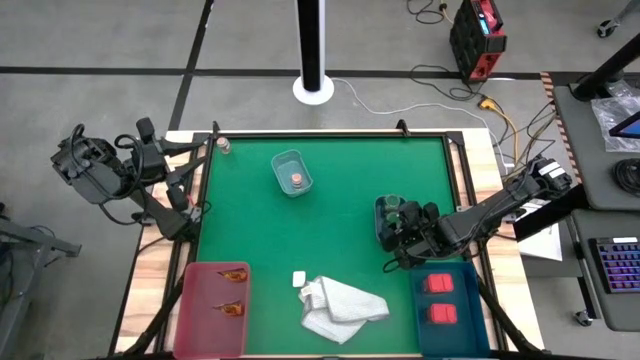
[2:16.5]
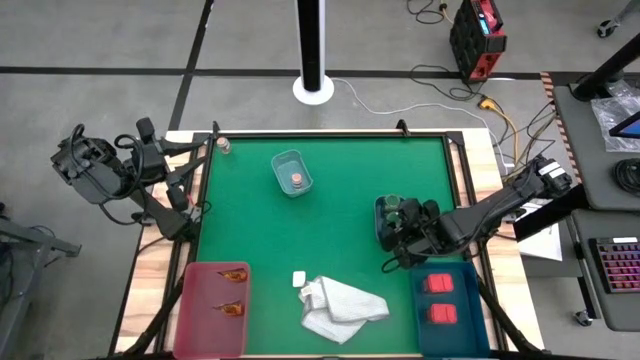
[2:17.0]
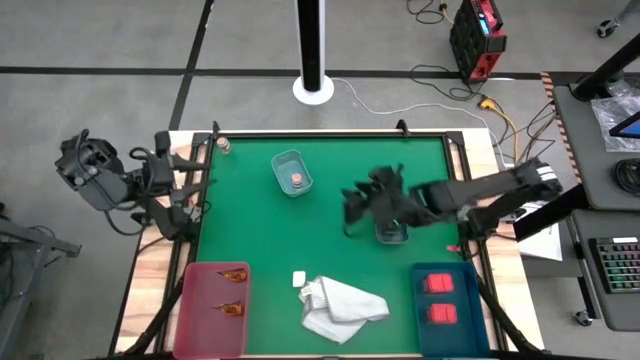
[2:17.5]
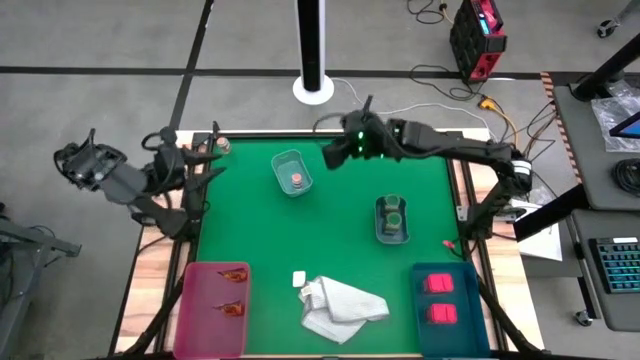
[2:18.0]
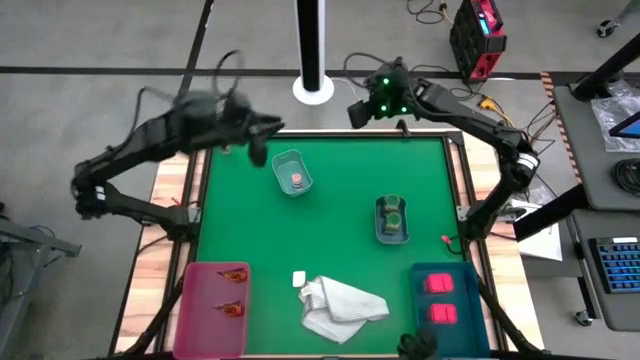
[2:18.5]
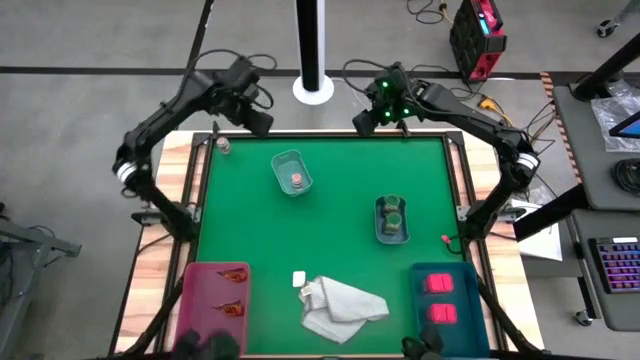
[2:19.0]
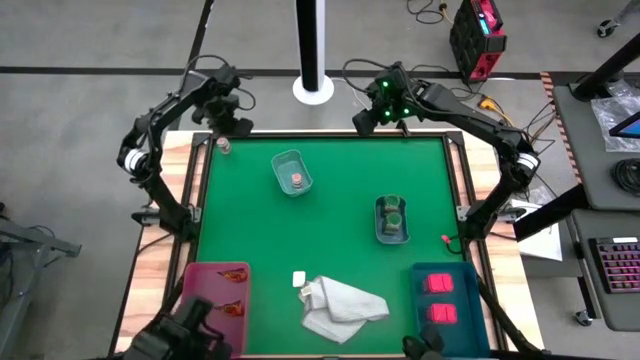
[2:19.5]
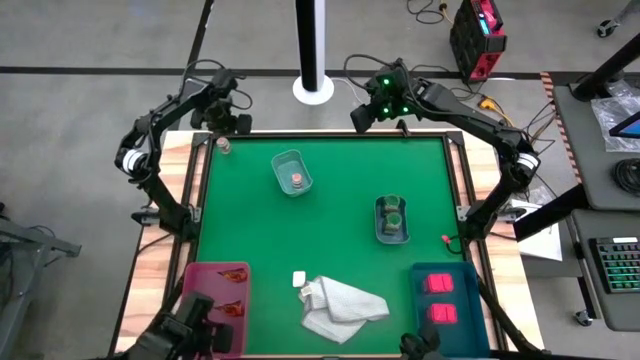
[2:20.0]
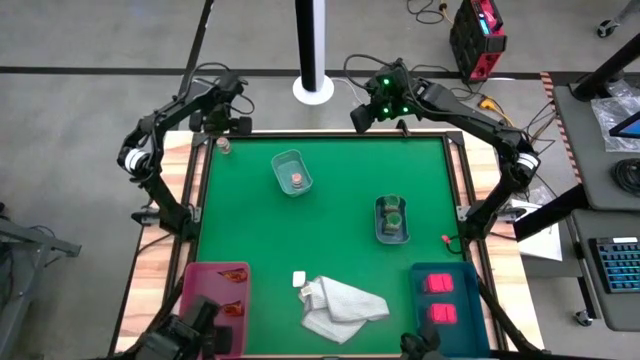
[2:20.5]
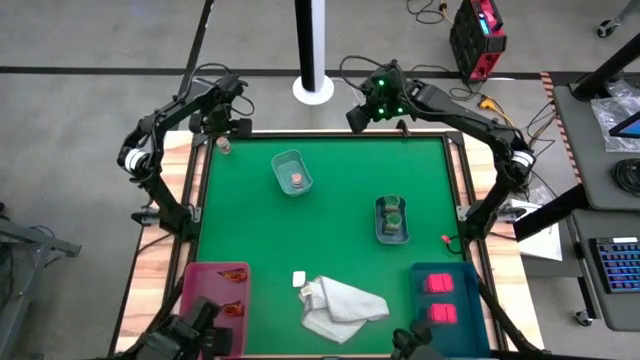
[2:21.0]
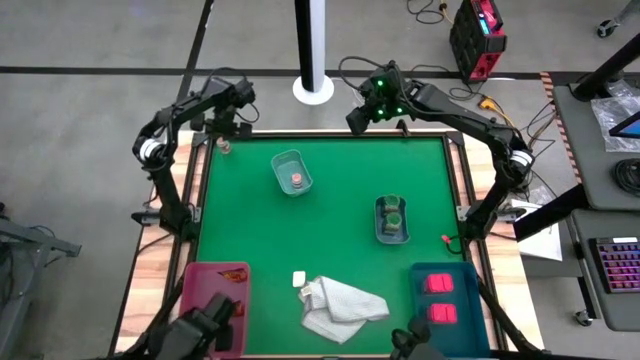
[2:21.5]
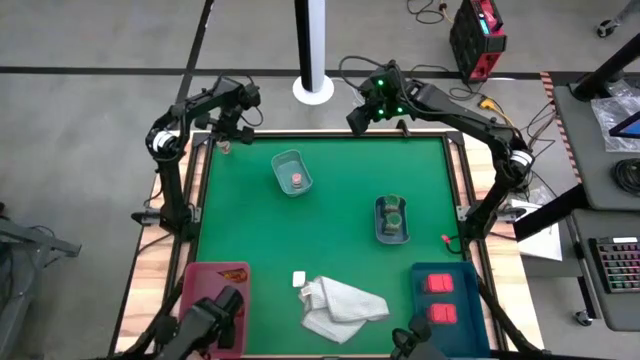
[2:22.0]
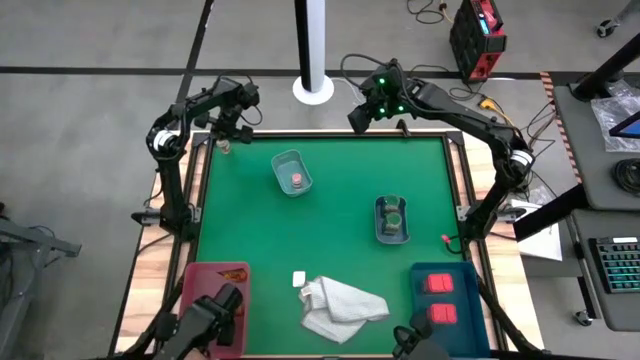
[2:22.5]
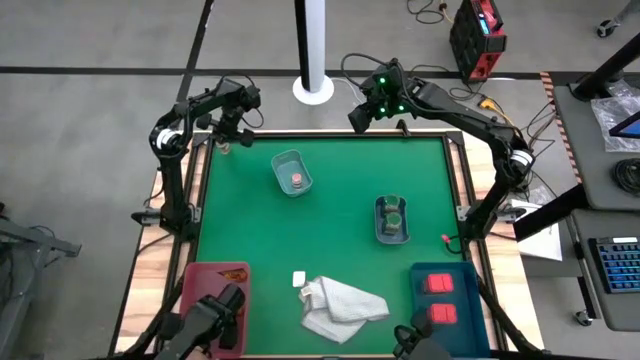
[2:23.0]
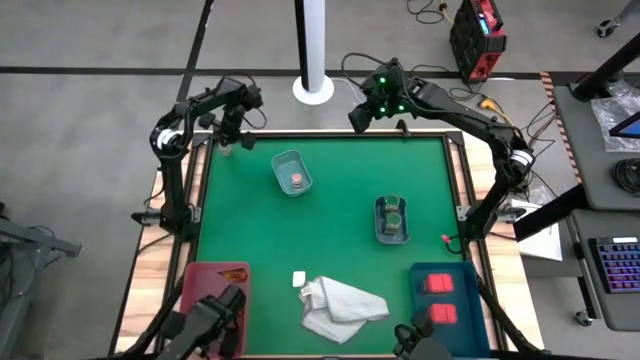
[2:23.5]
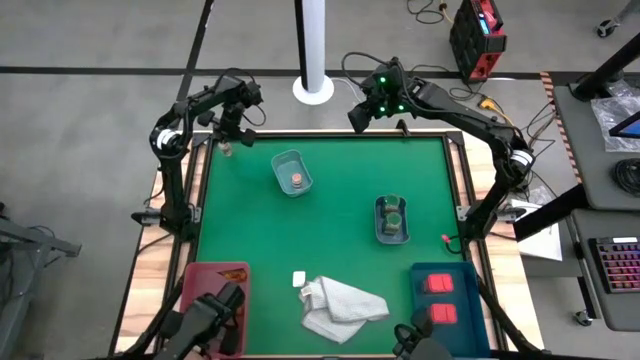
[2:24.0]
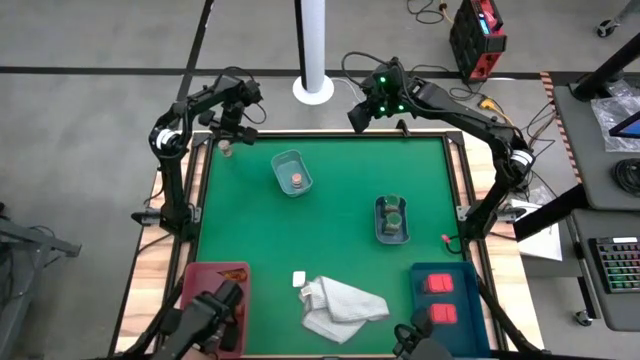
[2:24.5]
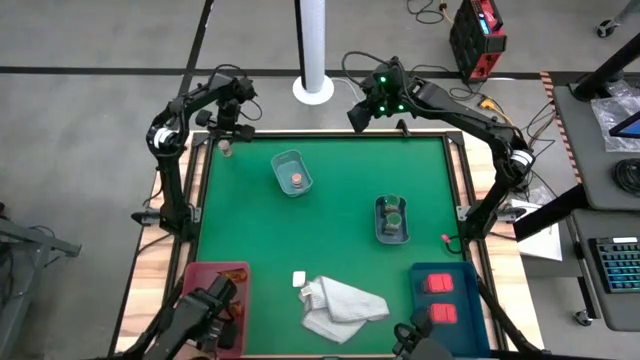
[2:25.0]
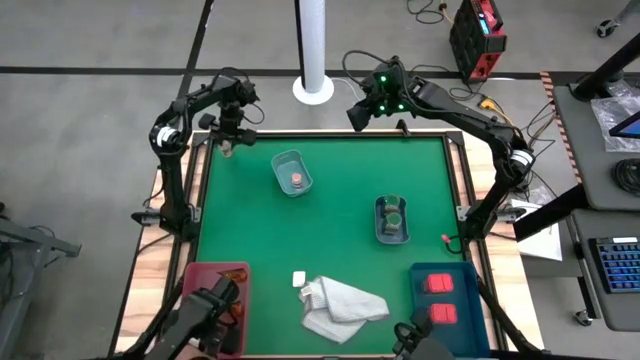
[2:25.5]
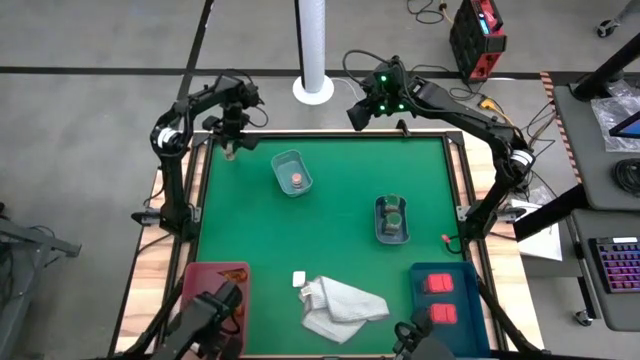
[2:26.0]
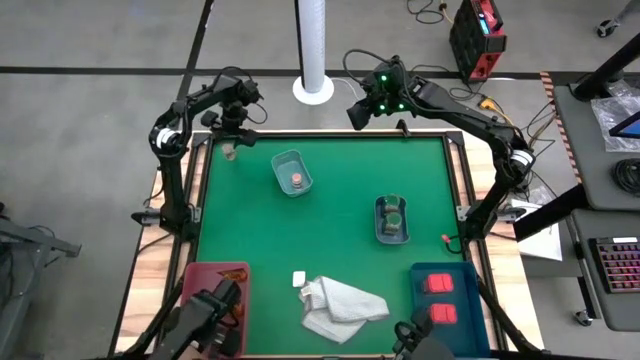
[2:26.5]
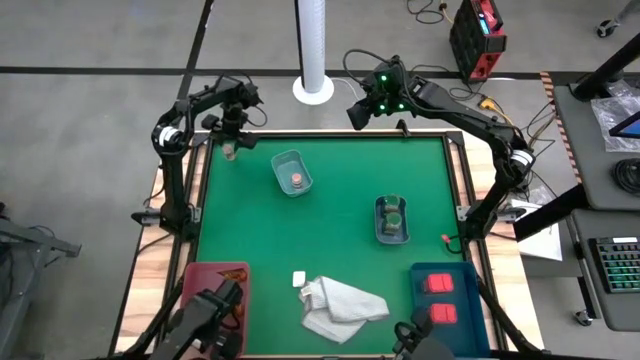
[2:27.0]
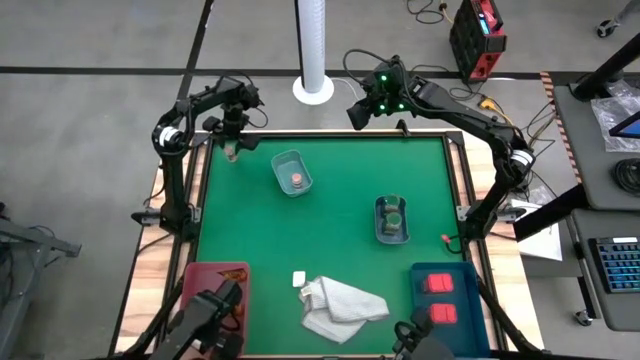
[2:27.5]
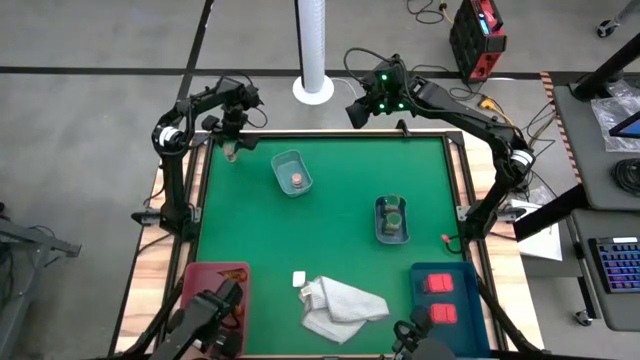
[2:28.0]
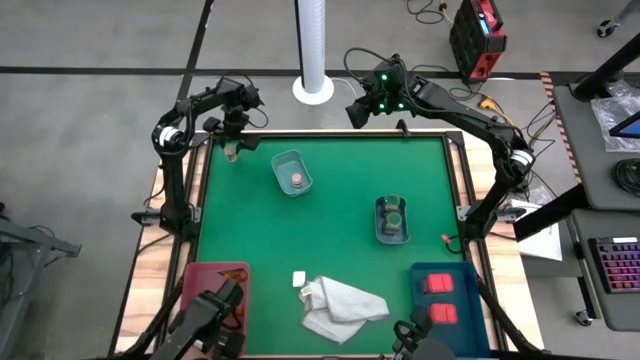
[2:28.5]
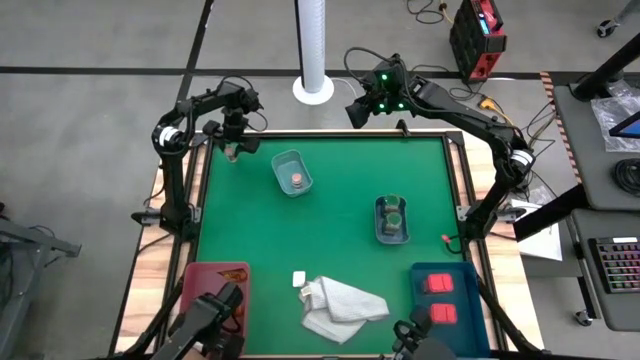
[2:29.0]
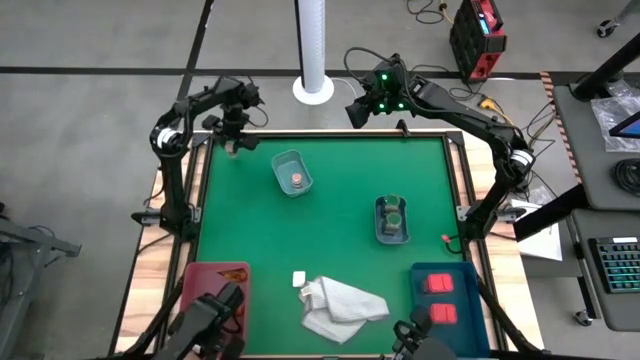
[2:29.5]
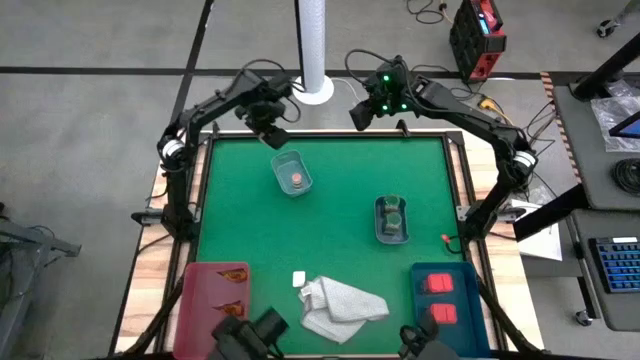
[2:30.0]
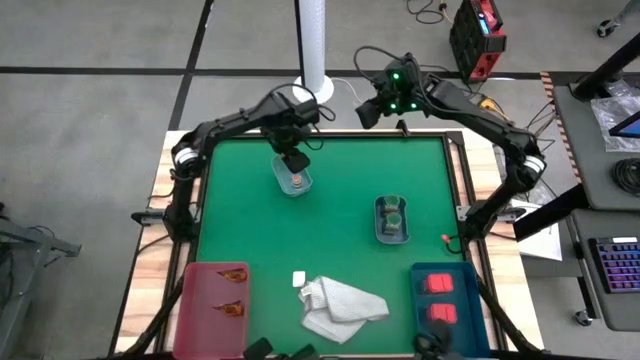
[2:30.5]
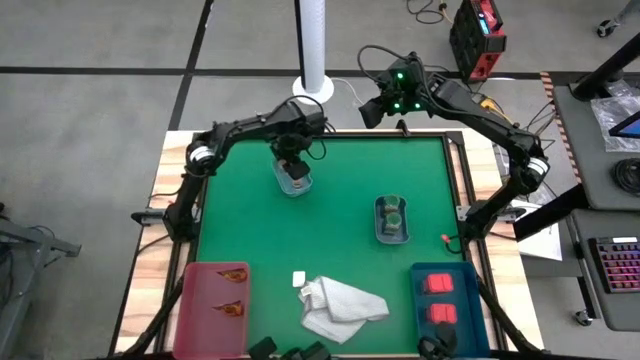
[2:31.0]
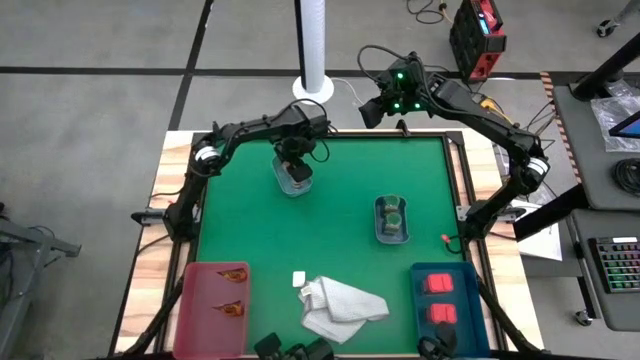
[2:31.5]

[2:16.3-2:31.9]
Task: Sort spices by type
Put the brown spice bottle into the green bin

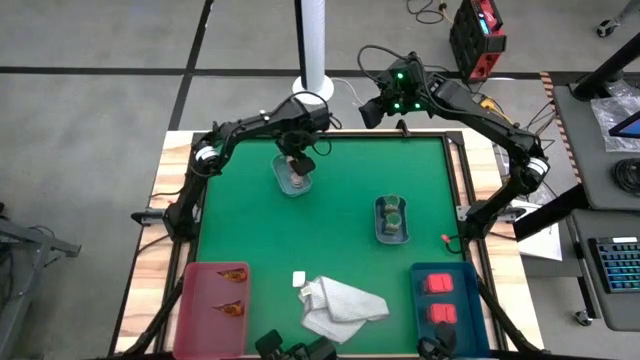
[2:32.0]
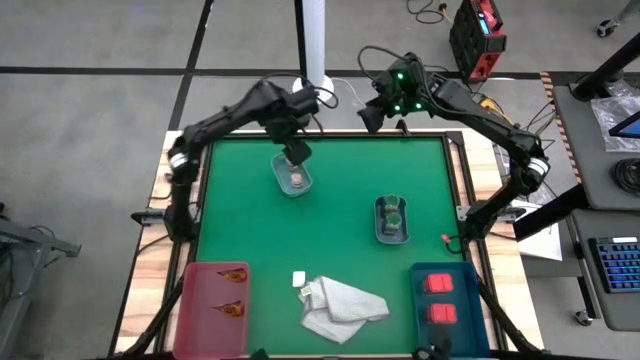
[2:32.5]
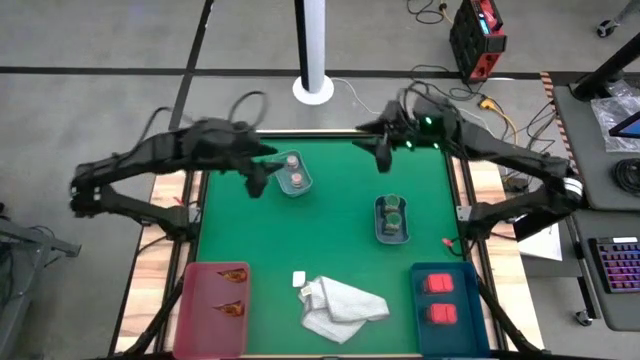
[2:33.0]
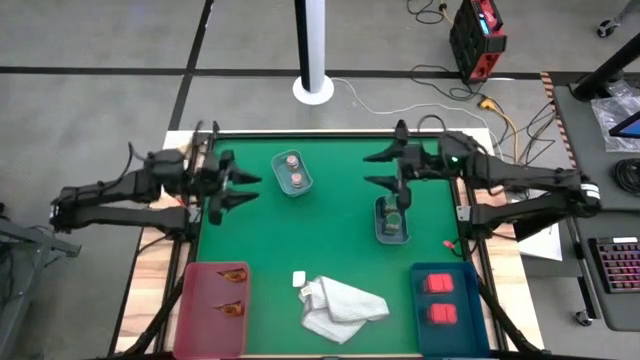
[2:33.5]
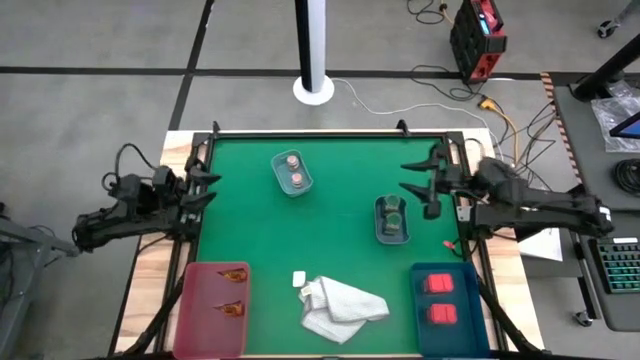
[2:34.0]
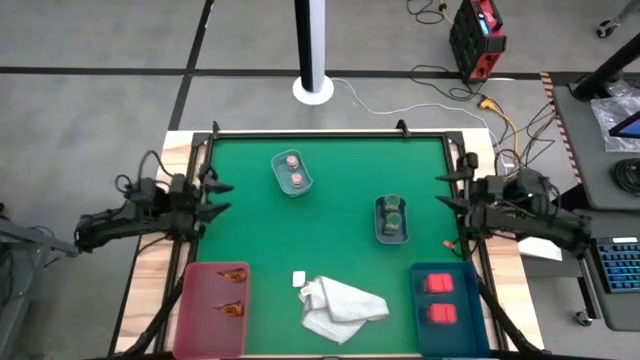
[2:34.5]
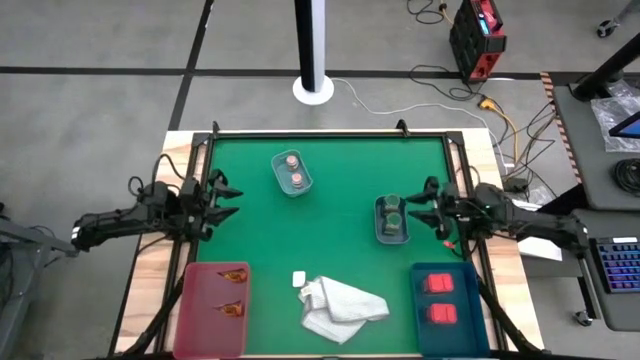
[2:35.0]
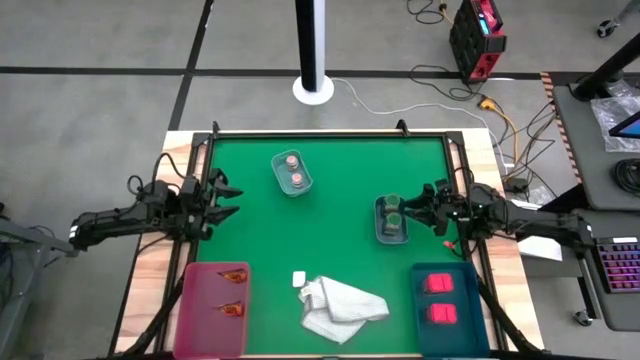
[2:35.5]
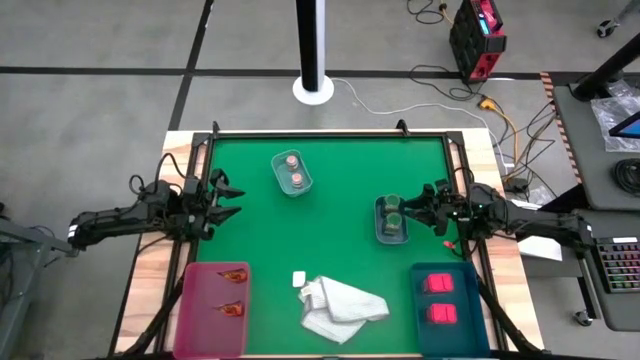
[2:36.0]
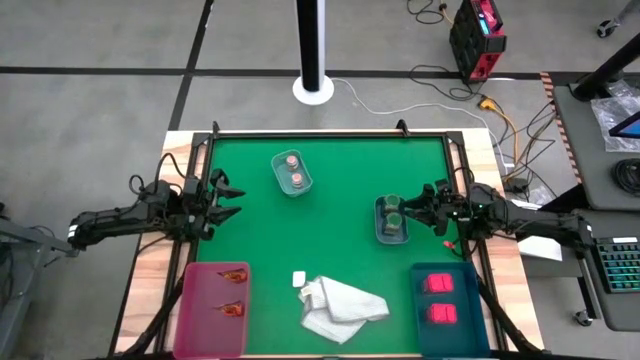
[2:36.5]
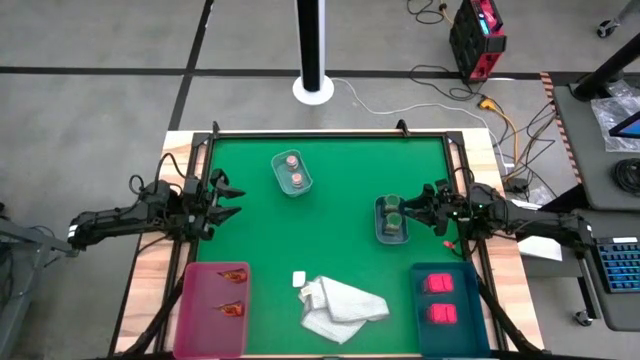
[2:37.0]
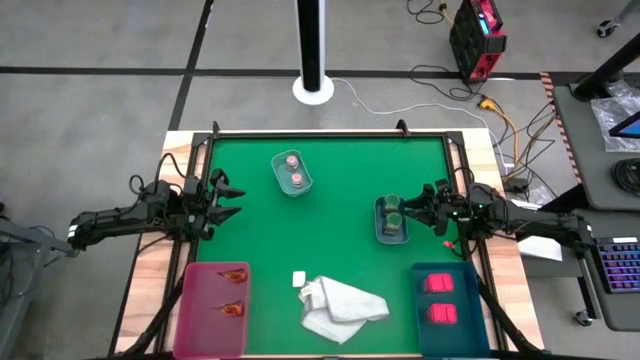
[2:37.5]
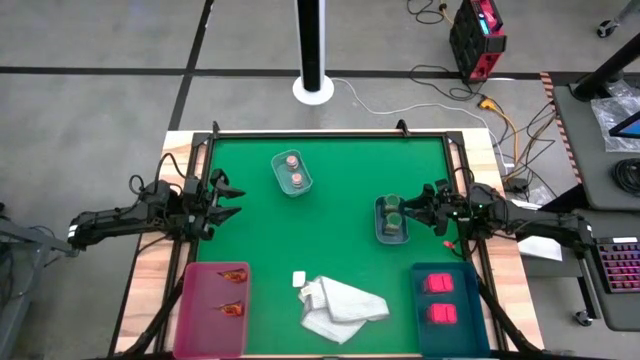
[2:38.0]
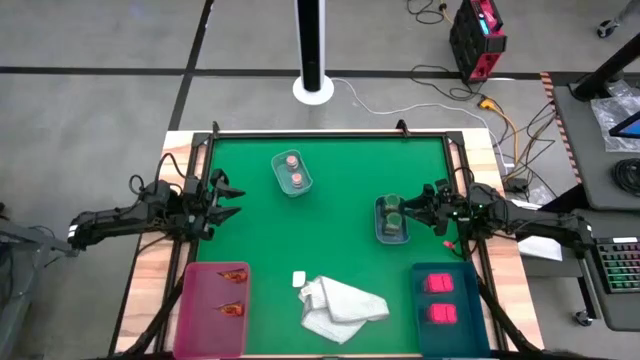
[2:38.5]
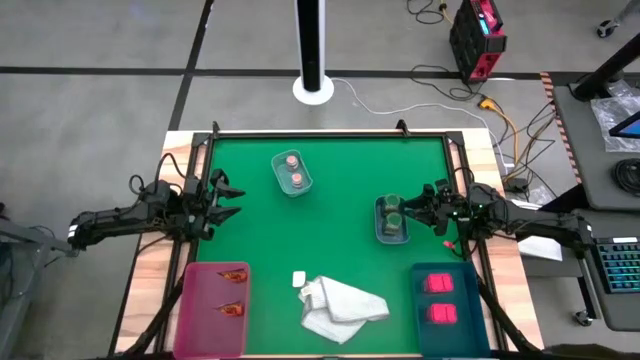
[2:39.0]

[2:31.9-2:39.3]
Return to Home Position
